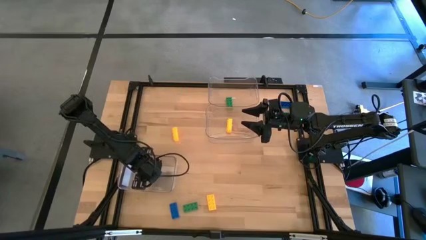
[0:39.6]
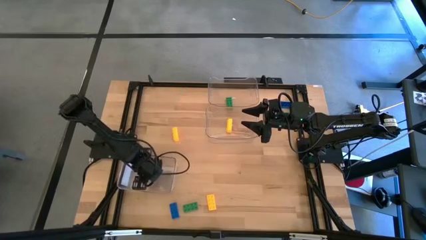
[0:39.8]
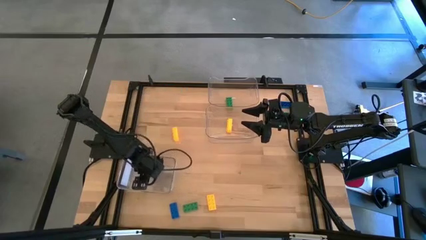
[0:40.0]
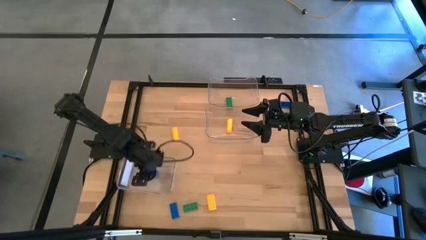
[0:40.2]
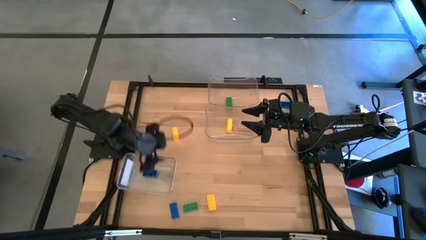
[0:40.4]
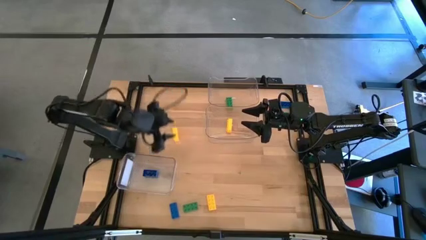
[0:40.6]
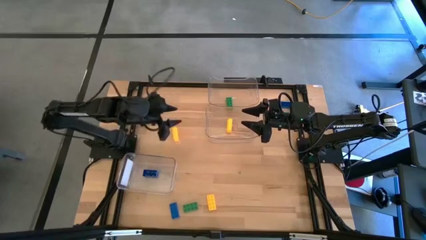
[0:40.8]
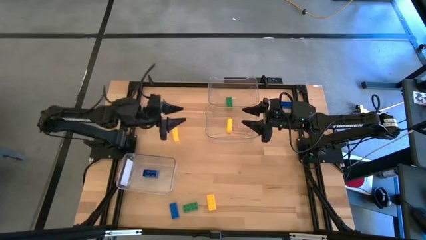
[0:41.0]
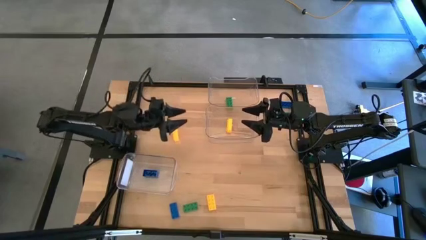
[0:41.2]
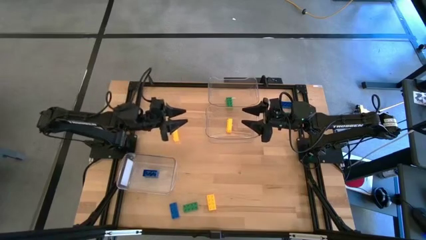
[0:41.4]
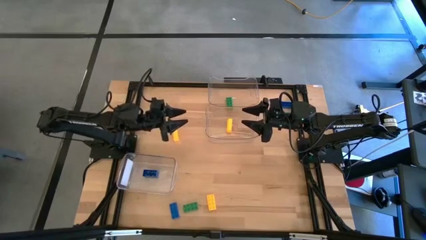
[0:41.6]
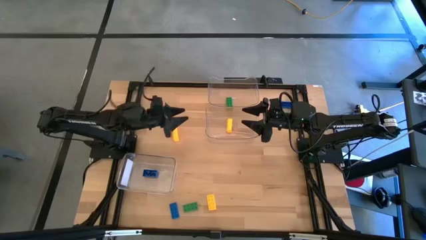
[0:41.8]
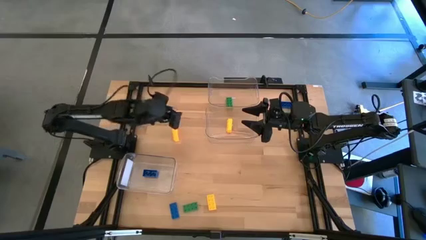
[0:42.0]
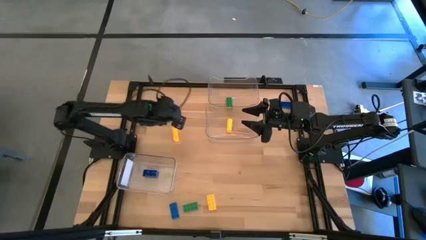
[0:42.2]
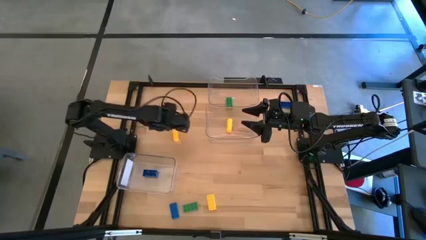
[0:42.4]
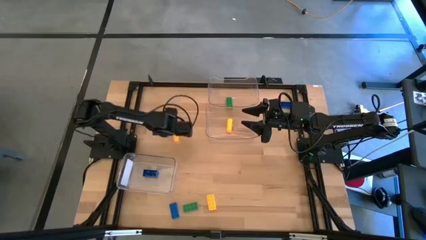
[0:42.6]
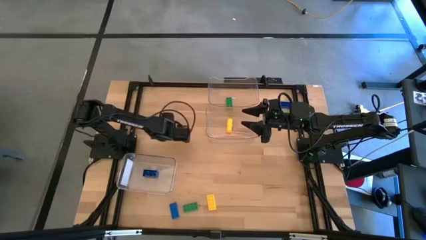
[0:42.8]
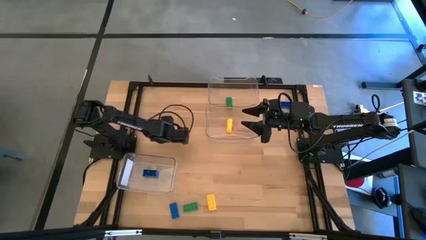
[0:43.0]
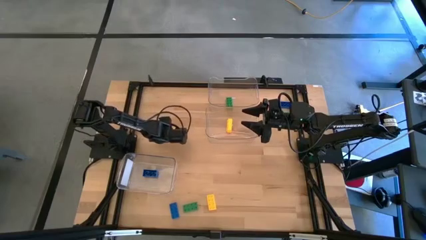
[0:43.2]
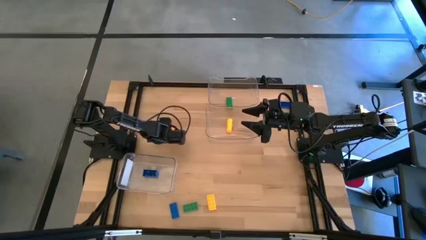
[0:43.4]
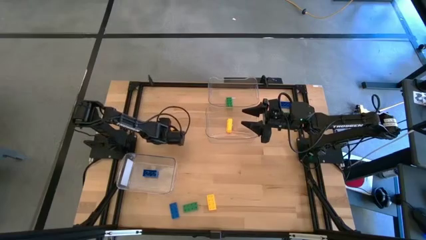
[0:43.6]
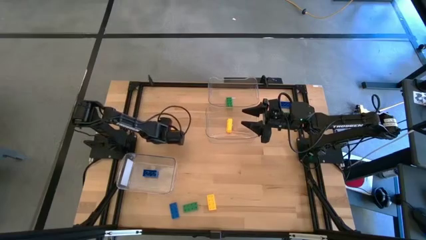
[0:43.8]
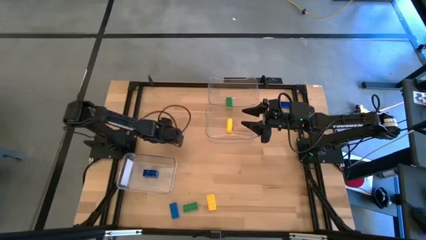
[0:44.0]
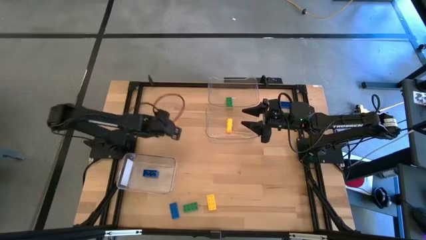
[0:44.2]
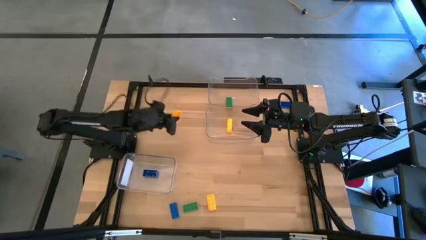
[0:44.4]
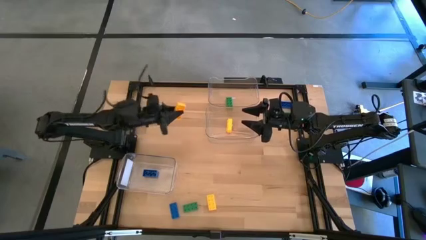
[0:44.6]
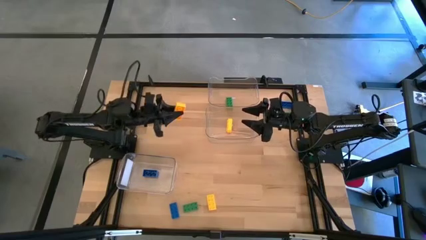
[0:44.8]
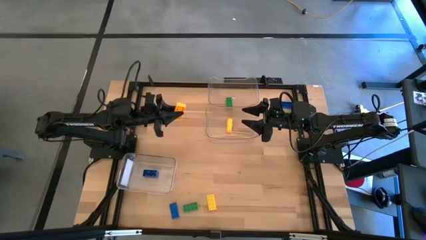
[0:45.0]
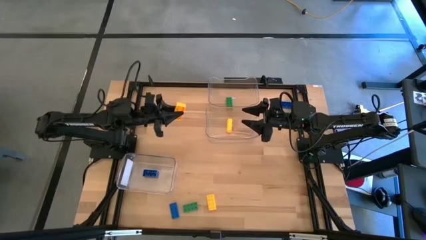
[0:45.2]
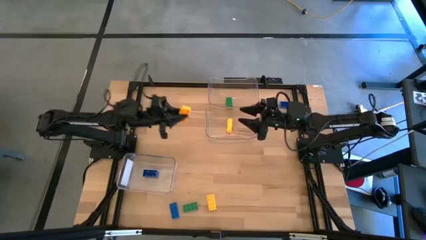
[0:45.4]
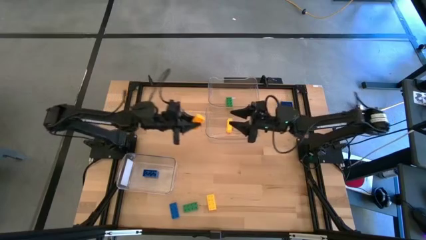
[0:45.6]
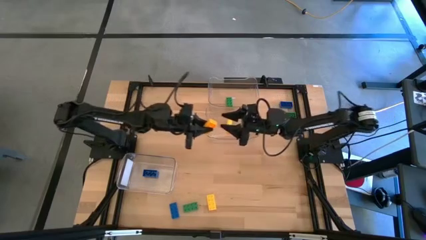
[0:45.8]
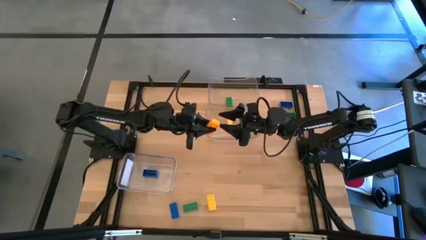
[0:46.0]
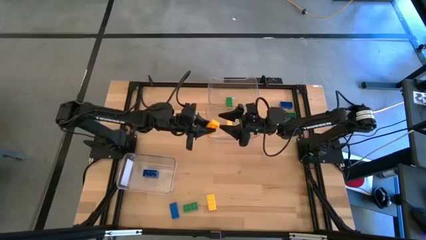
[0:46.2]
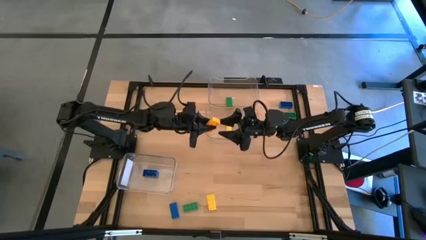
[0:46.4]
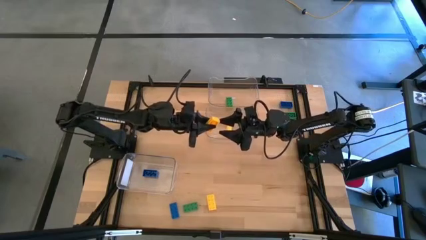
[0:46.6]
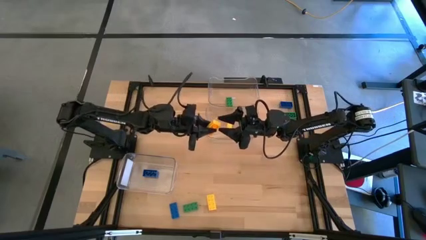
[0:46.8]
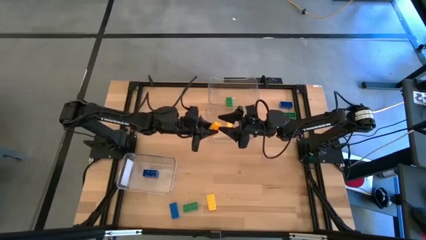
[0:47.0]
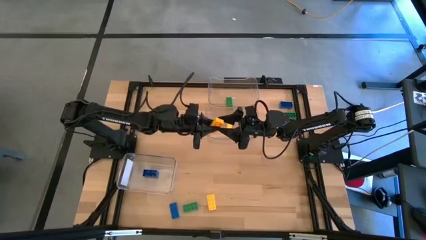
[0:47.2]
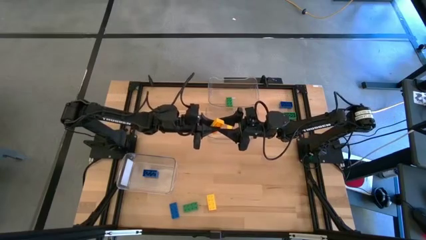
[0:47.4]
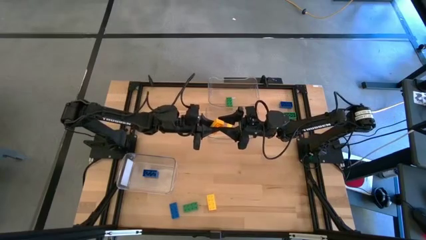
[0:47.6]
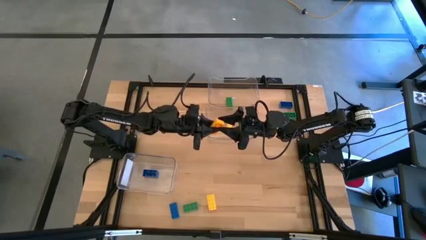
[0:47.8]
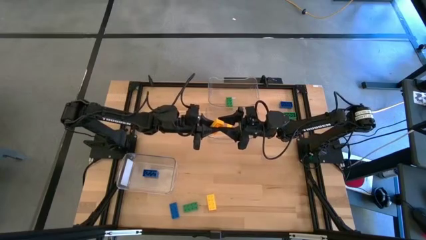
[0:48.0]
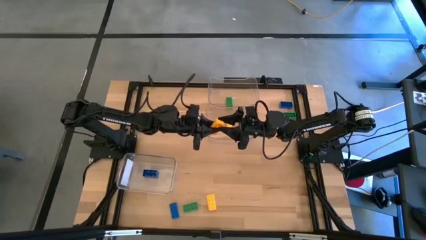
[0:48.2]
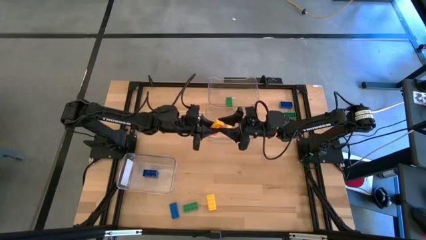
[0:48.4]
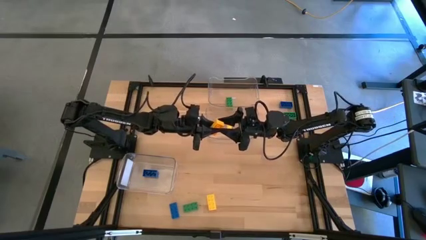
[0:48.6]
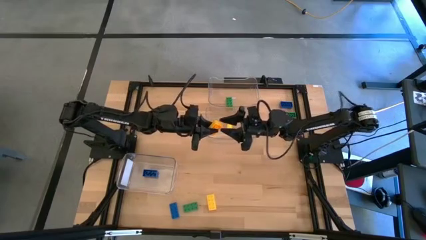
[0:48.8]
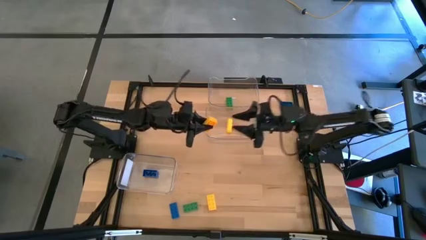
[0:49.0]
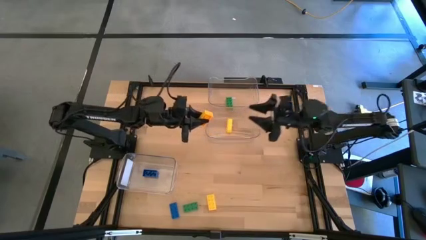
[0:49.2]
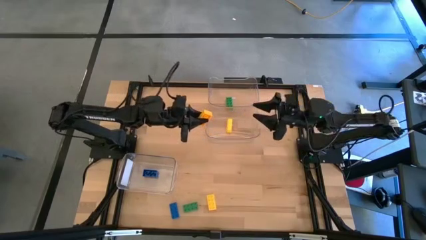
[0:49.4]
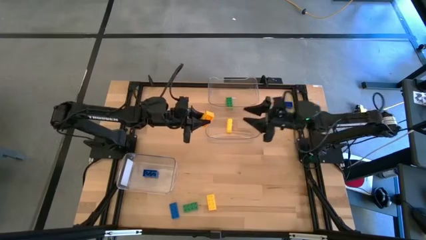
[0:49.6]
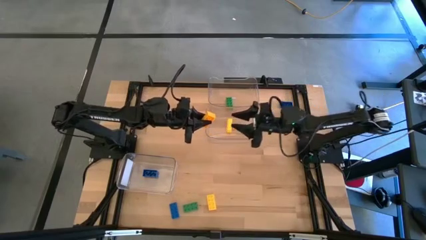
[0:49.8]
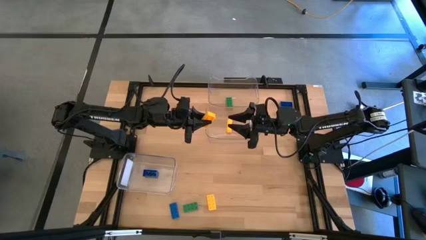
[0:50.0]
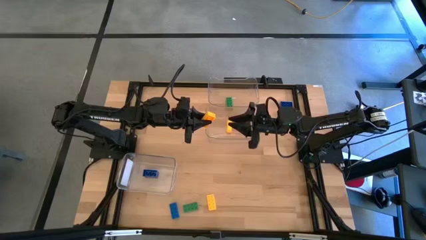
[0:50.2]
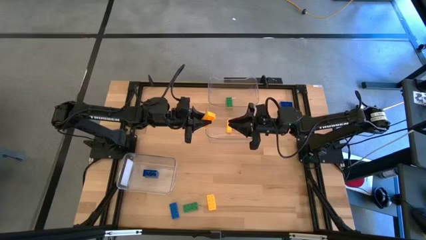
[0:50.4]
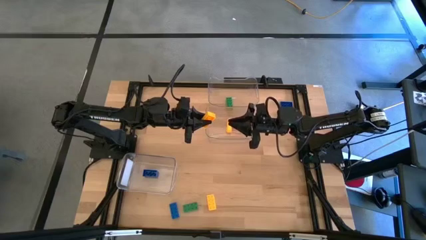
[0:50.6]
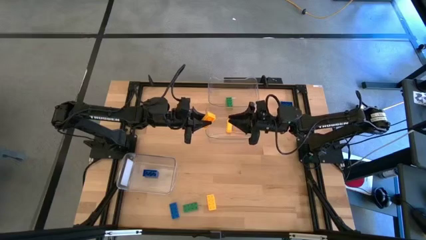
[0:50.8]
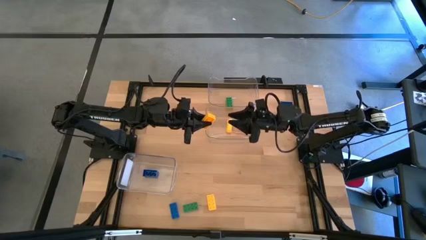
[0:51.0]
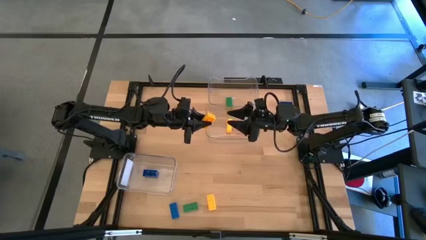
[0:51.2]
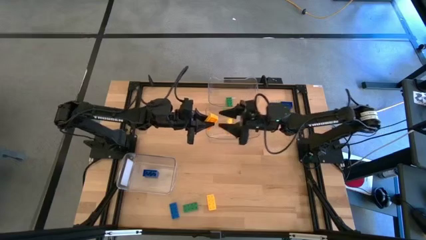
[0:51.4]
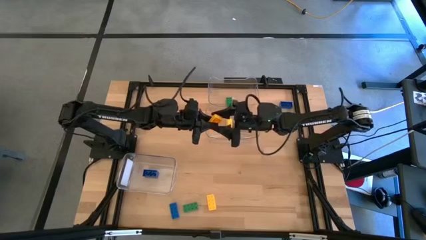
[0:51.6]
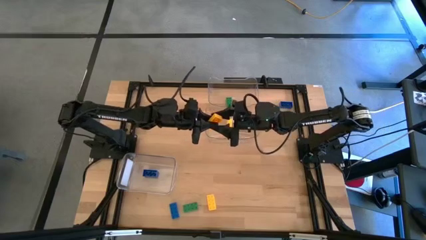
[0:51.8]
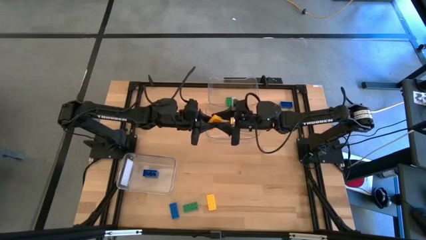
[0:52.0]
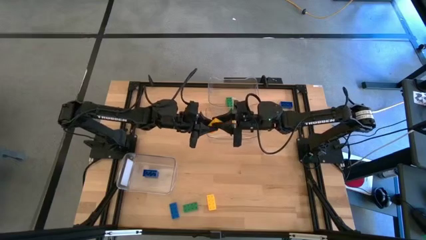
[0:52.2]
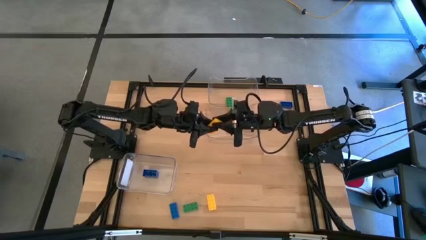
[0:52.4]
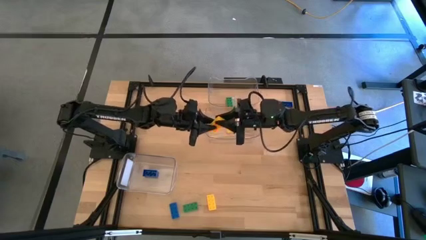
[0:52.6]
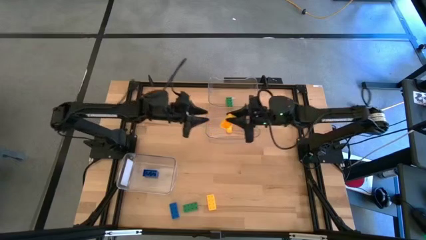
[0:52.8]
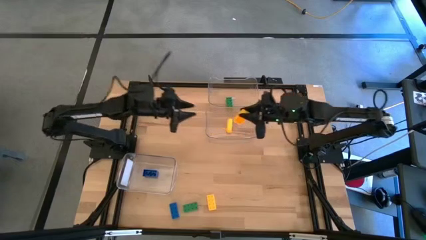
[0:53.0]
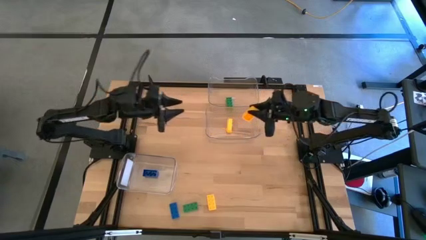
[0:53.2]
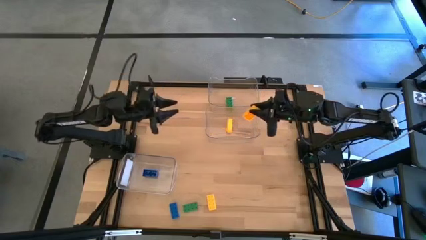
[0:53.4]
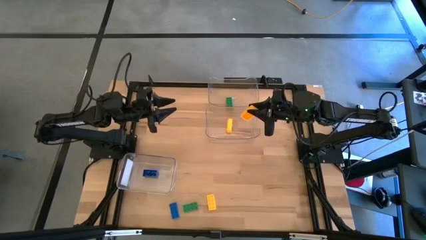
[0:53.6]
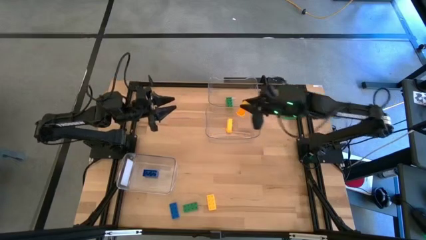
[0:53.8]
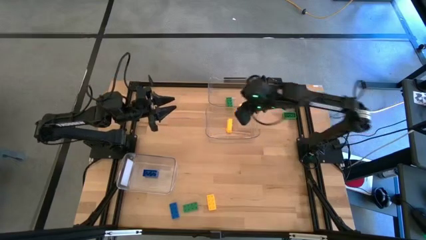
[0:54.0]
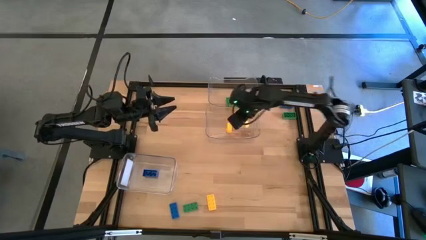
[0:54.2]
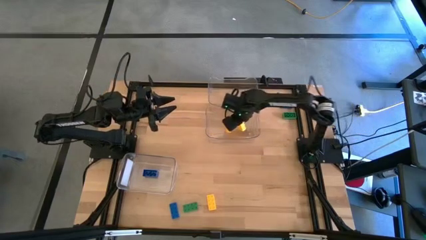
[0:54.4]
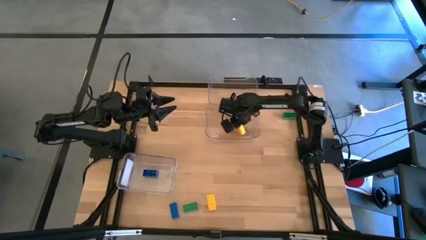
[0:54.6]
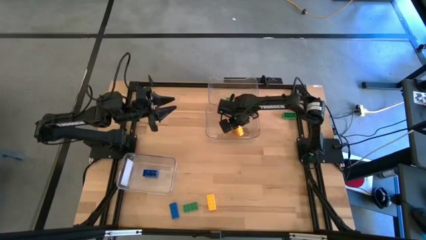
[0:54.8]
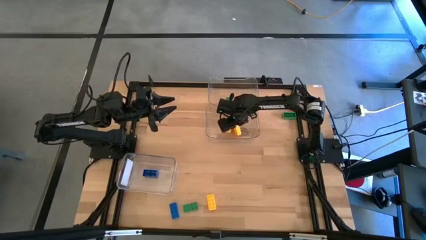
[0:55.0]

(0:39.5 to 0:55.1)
Task: Sort & place blocks by color
Put the top yellow game piece into the center transparent bin
